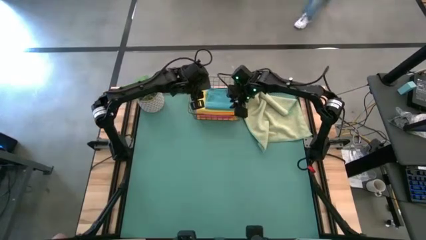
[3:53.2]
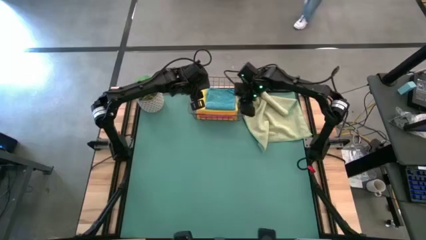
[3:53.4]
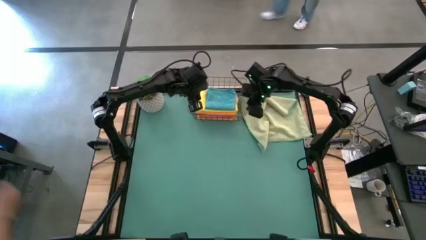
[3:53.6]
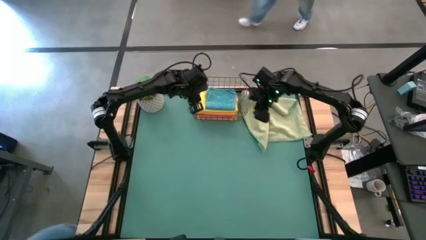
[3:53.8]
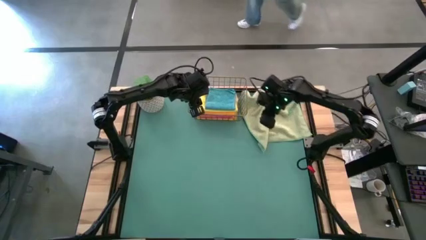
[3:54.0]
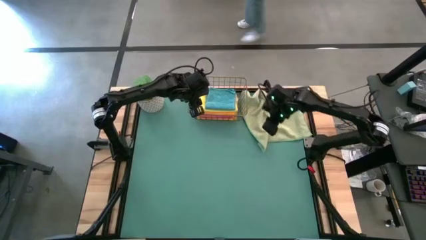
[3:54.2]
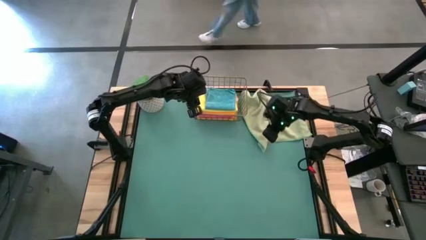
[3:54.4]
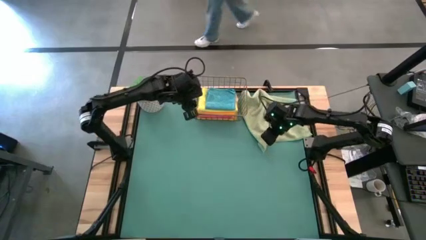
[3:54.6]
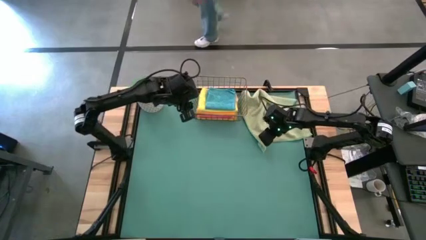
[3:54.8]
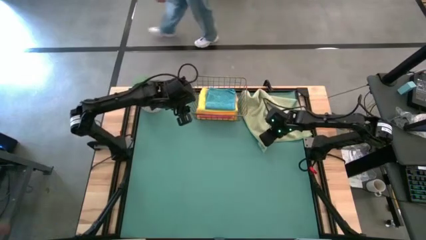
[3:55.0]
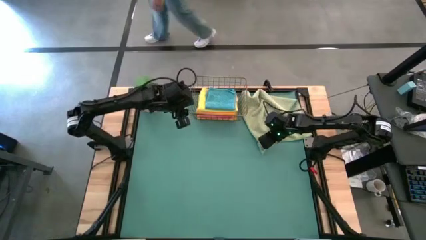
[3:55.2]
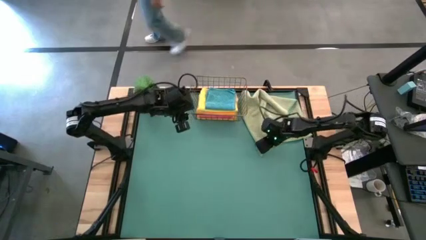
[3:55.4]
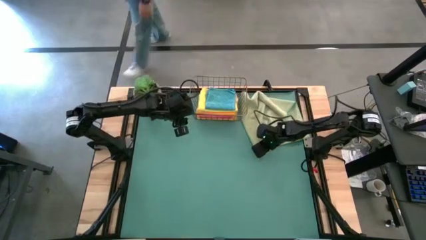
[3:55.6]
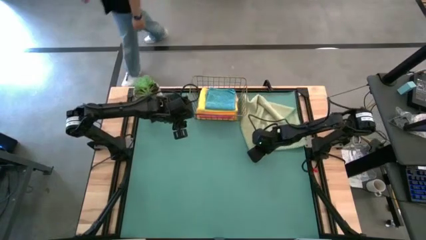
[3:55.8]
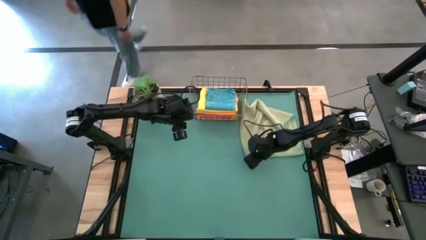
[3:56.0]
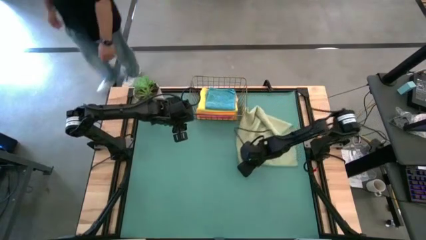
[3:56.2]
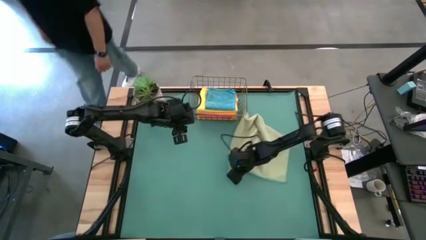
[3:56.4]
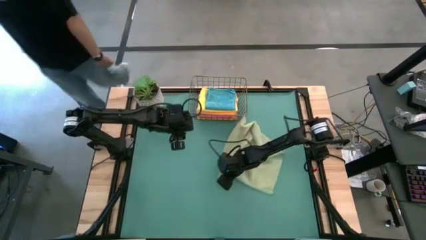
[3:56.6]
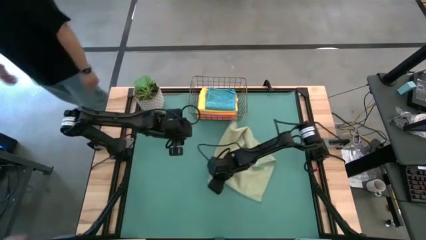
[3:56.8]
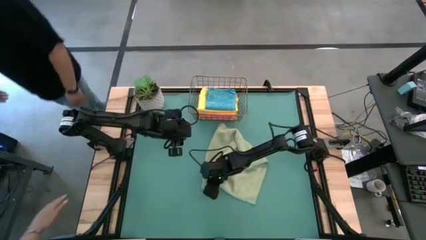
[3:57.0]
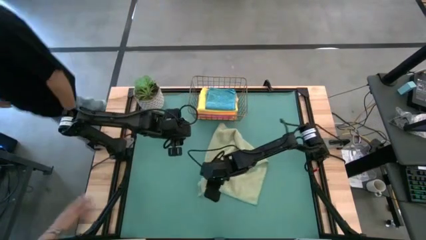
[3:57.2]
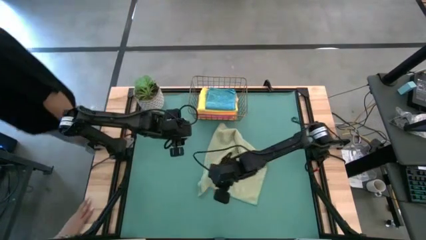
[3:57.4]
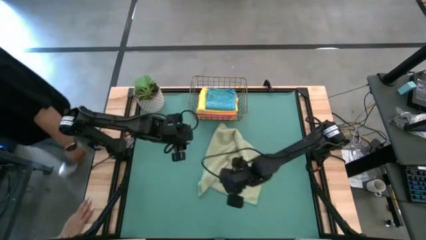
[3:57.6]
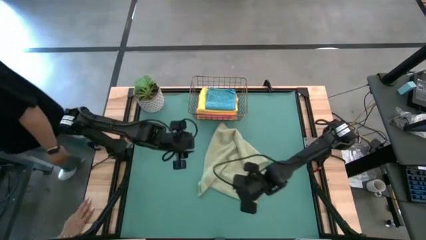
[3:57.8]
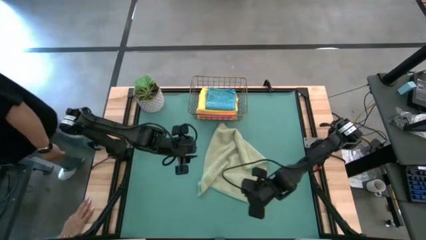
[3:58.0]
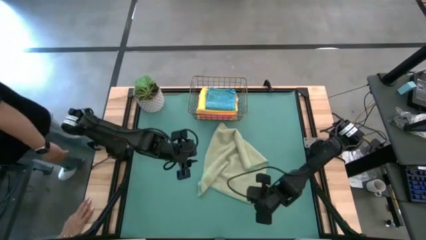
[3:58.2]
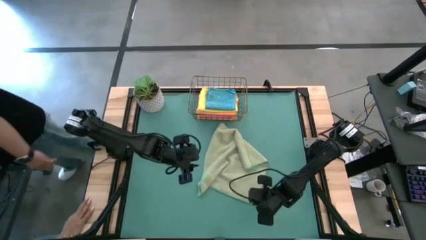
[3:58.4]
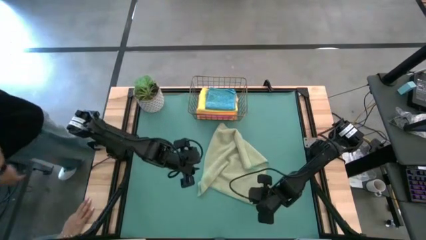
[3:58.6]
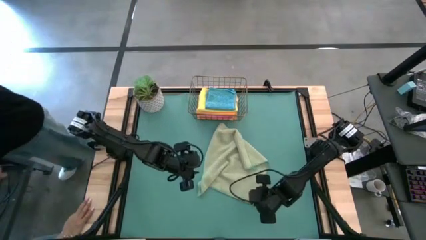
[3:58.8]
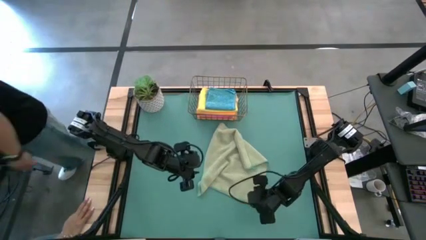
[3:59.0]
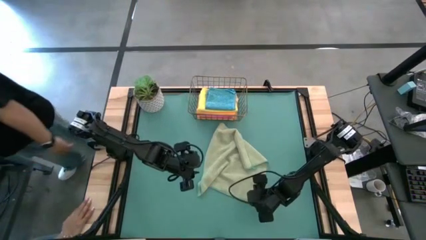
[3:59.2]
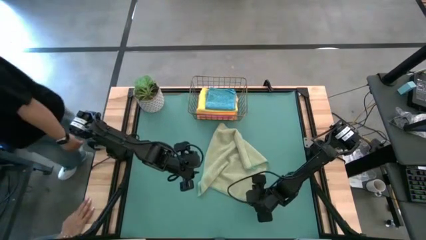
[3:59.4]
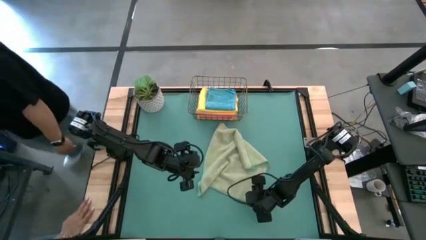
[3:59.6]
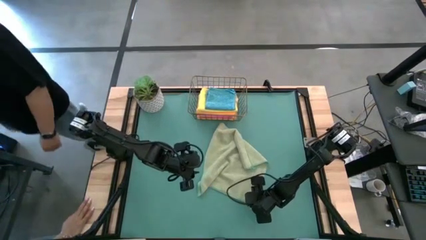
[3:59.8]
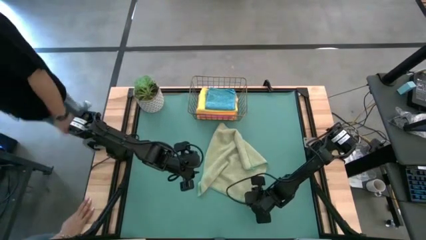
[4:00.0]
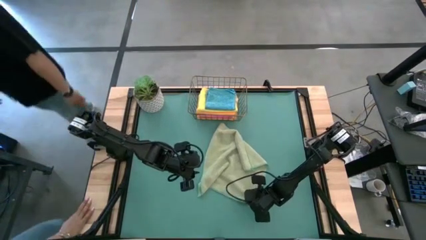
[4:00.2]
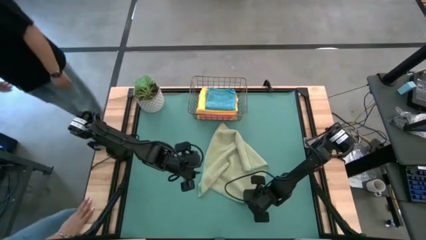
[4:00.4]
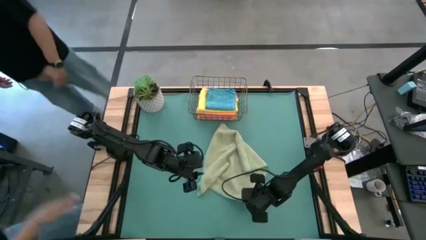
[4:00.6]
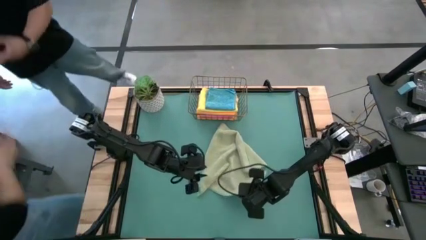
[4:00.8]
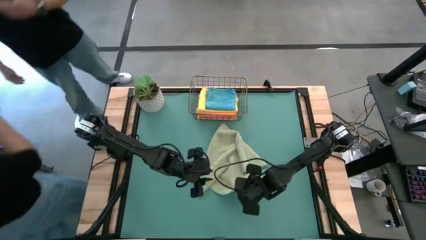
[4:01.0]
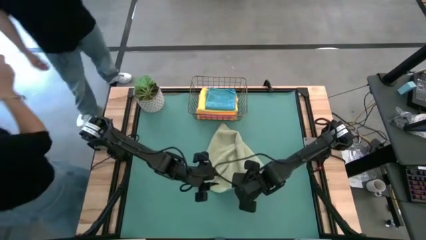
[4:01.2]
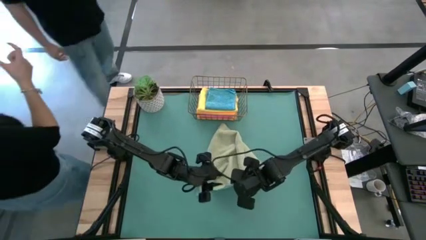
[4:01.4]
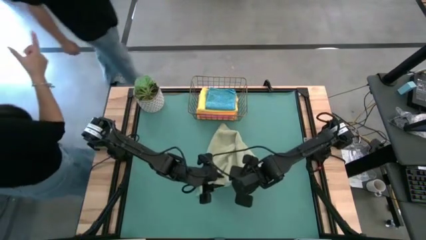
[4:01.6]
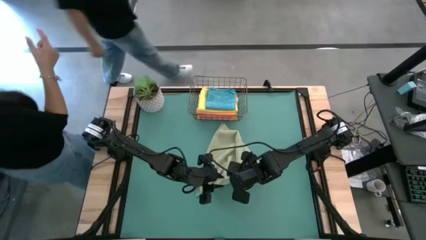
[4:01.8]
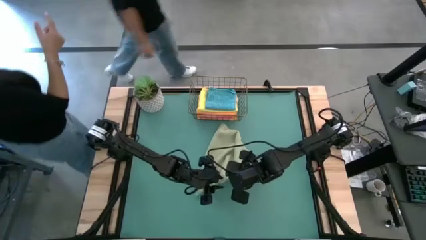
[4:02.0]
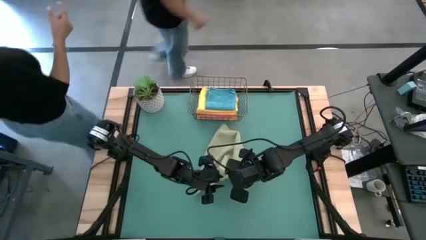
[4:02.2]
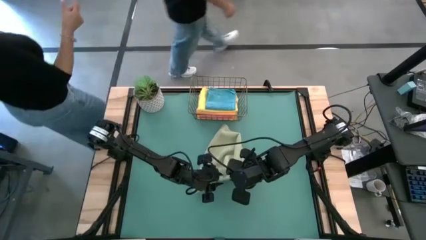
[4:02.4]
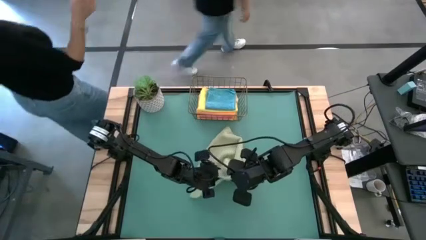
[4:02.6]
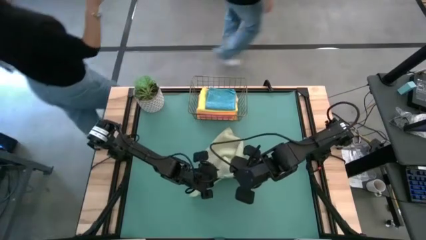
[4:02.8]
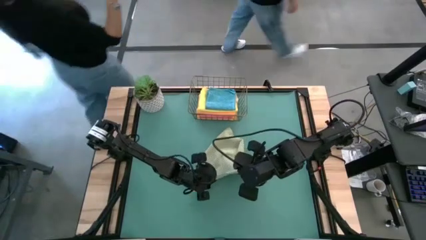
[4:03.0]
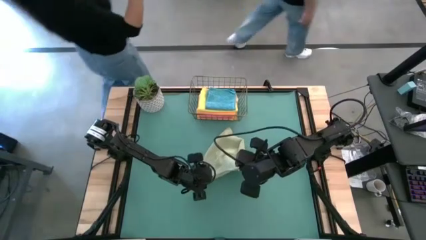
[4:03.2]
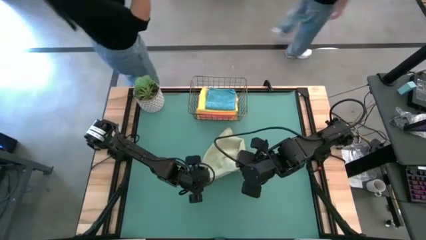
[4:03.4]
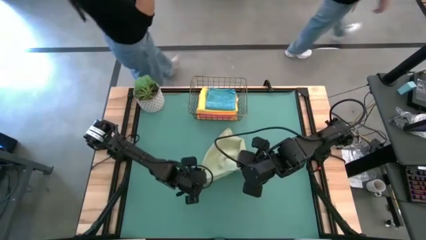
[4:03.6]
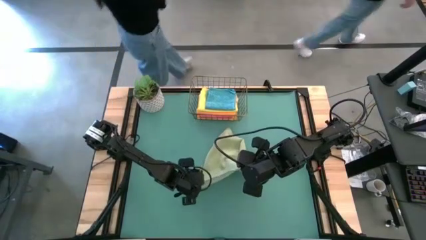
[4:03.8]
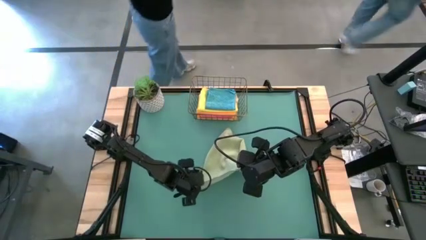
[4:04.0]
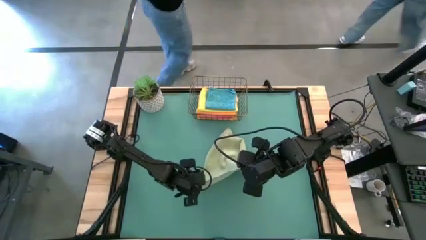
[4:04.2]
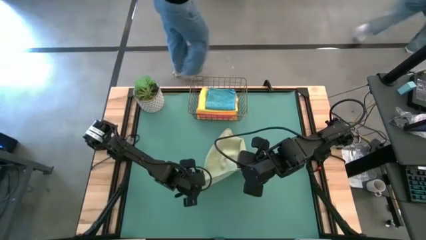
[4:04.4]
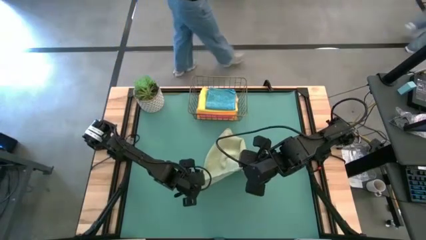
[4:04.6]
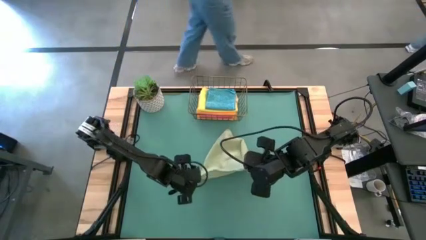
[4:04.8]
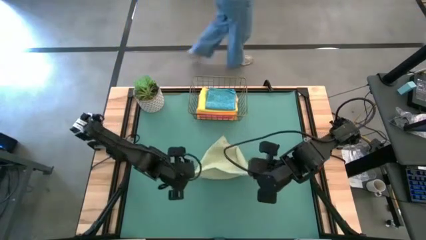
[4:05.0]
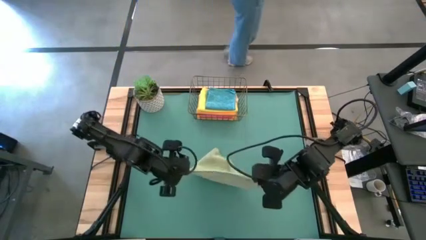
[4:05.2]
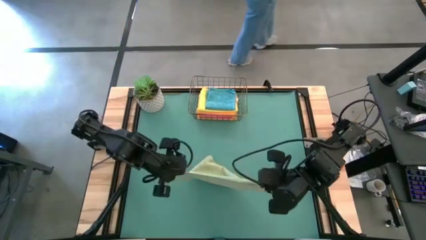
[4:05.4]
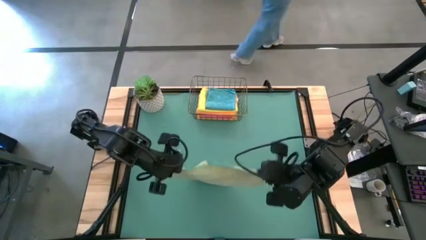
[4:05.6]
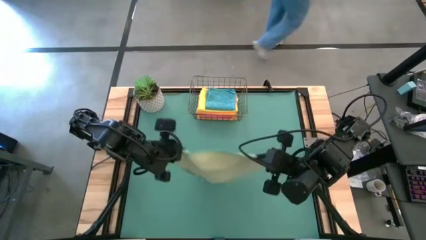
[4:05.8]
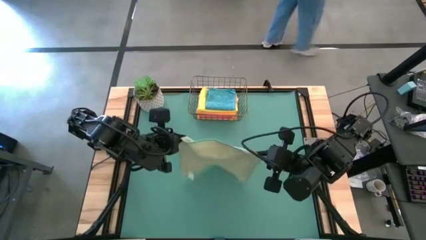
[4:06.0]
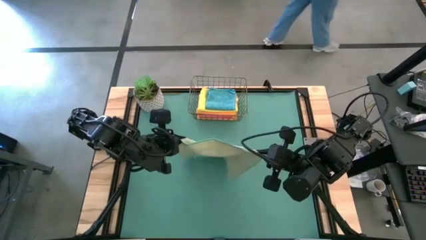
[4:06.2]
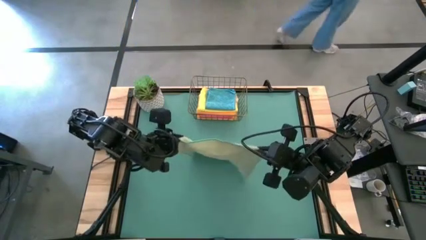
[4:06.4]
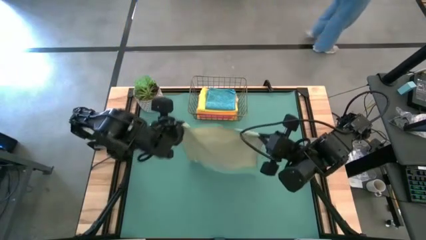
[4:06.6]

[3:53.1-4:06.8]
Task: Fold microfiber towels
Fold the green microfiber towel

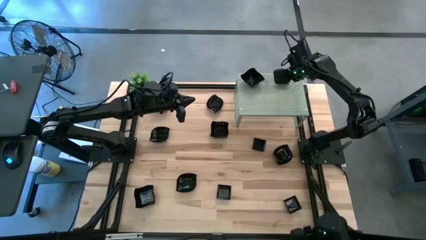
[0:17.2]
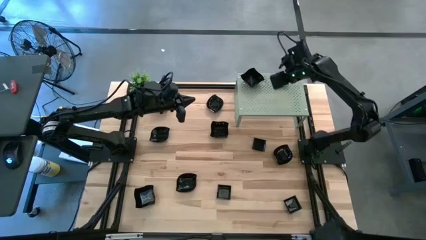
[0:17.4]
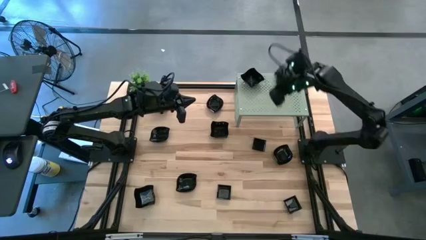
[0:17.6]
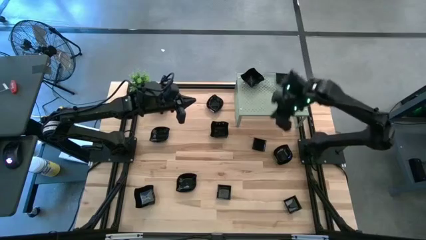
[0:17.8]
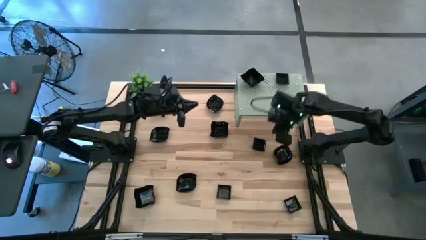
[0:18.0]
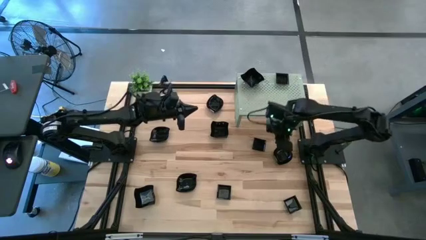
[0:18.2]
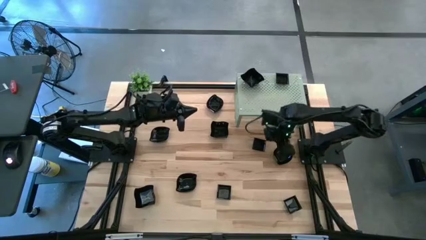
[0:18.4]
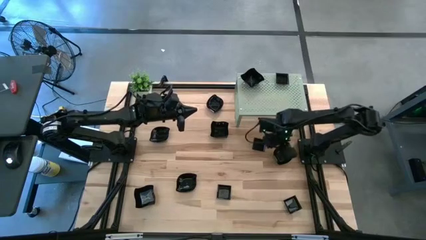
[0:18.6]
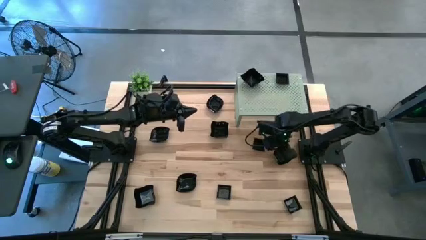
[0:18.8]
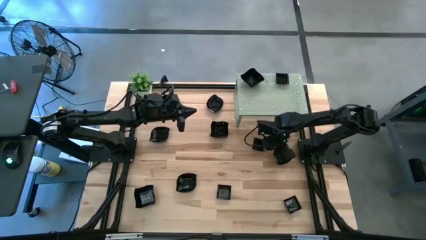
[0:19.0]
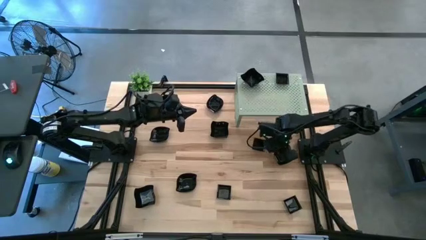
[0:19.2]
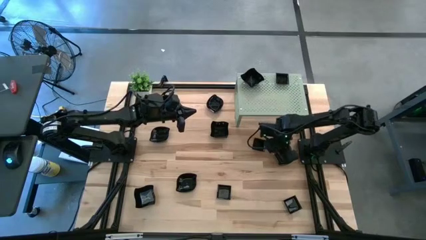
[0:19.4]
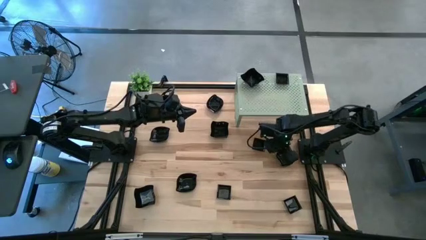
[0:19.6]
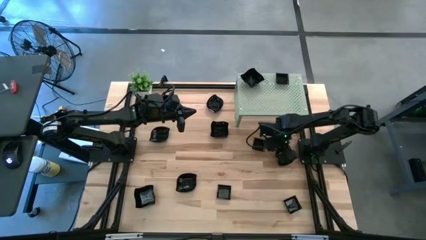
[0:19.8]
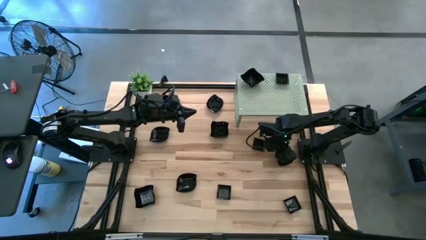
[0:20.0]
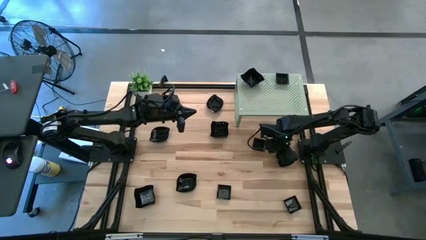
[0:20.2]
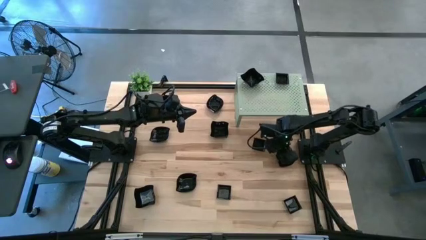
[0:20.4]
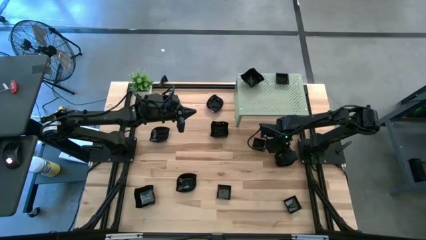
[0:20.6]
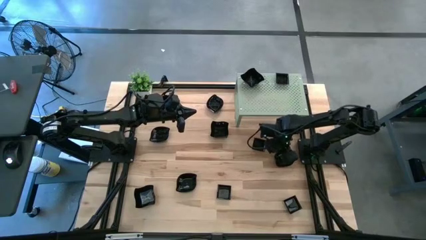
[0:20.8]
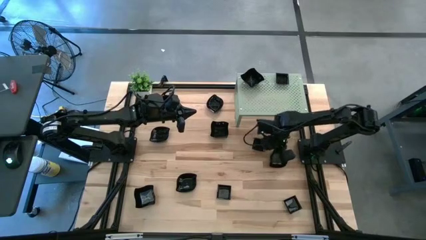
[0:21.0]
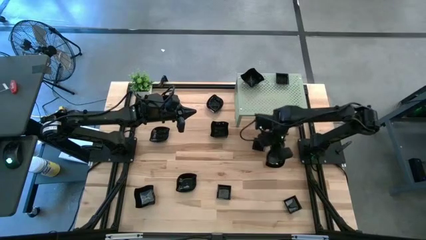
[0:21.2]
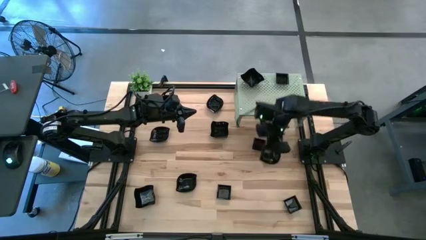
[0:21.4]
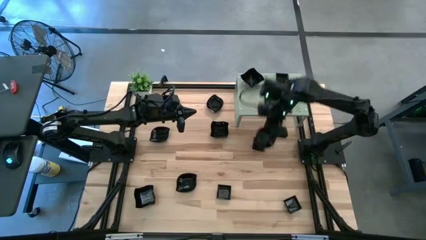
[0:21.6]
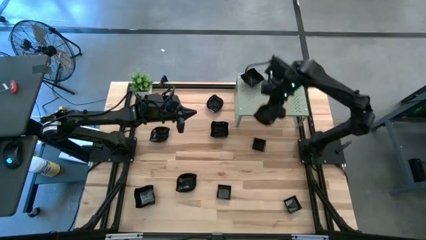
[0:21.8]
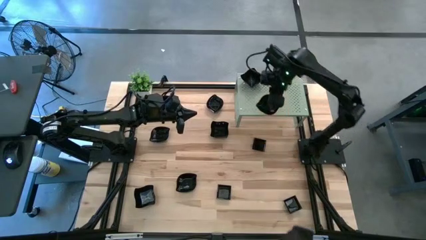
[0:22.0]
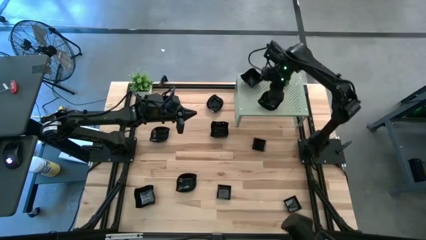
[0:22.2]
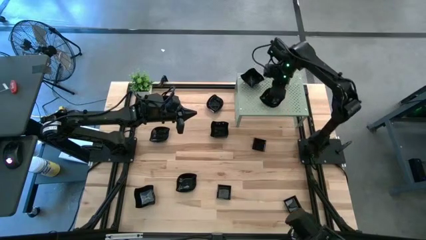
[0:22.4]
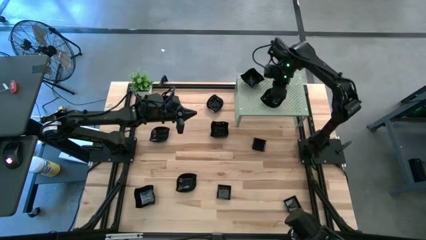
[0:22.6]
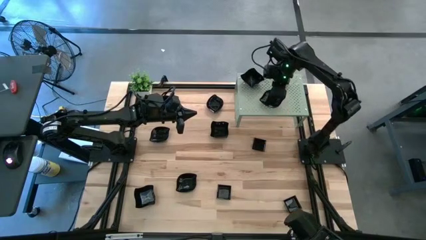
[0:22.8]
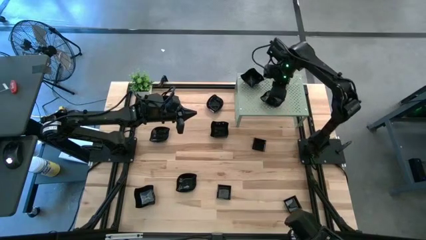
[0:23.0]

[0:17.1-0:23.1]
Task: Pick & Place Mini shaped plates
Put the leaf-shaped plate on the shelf
